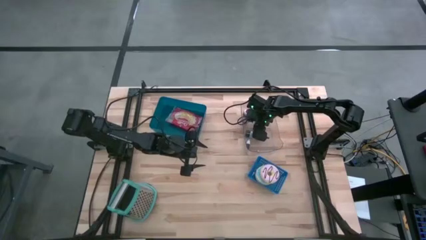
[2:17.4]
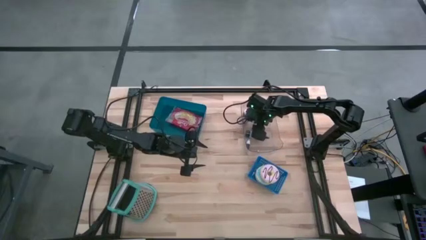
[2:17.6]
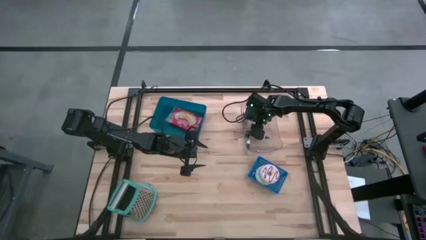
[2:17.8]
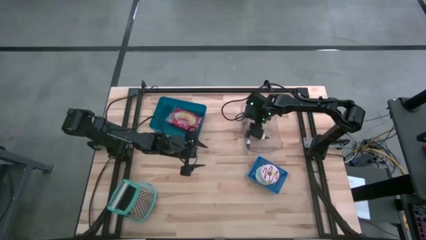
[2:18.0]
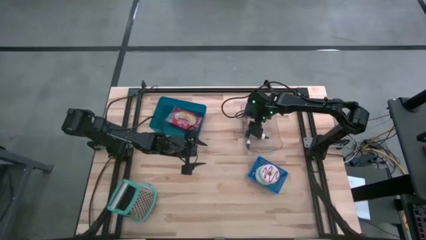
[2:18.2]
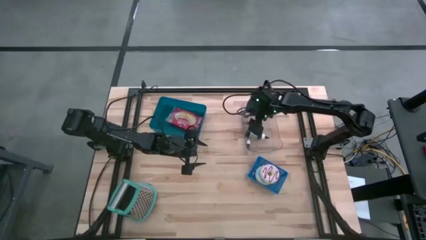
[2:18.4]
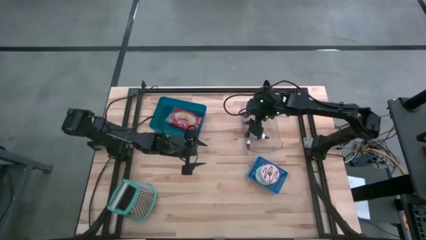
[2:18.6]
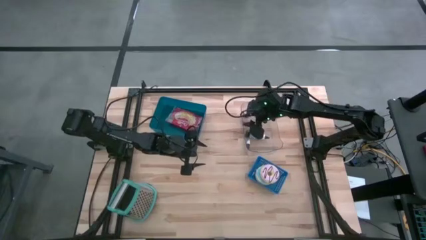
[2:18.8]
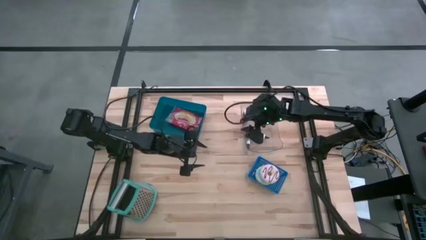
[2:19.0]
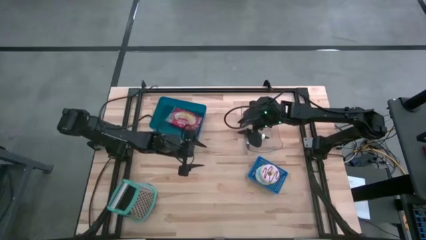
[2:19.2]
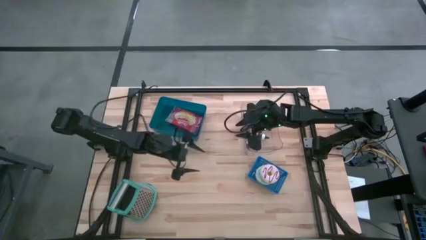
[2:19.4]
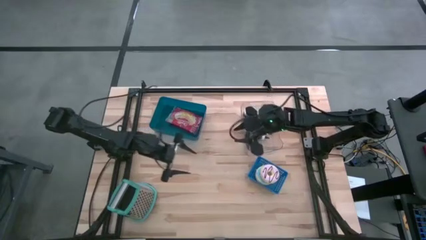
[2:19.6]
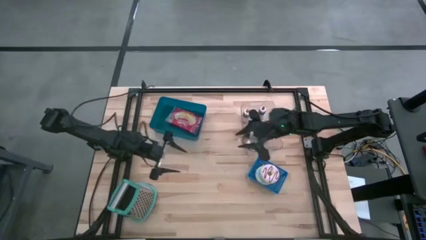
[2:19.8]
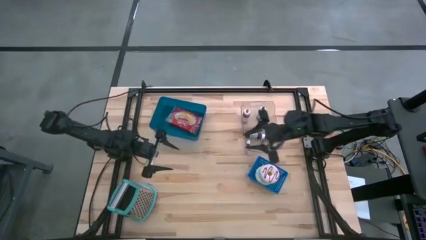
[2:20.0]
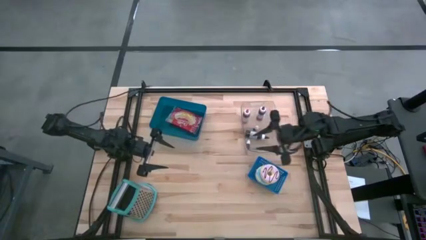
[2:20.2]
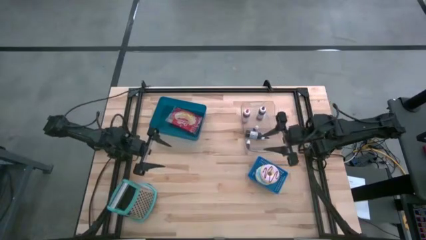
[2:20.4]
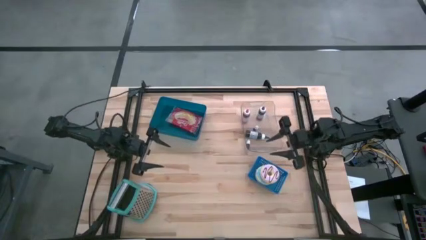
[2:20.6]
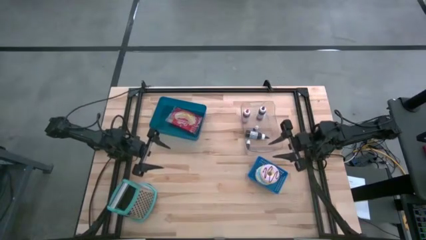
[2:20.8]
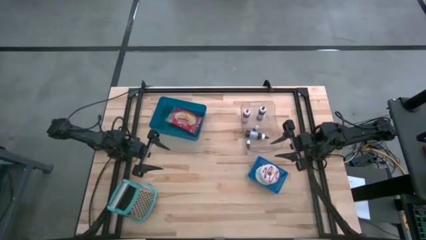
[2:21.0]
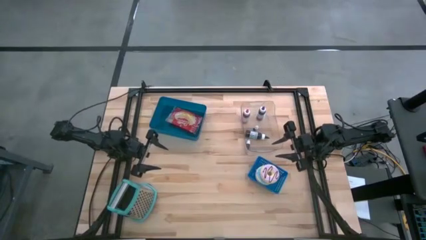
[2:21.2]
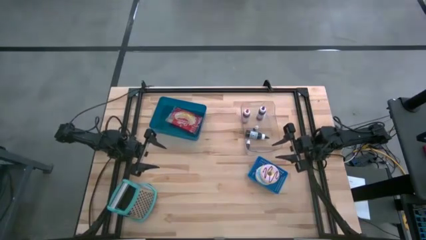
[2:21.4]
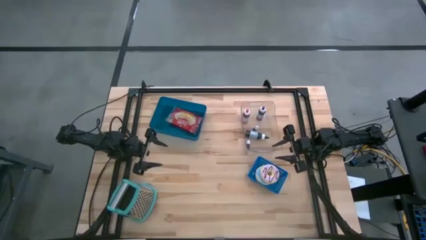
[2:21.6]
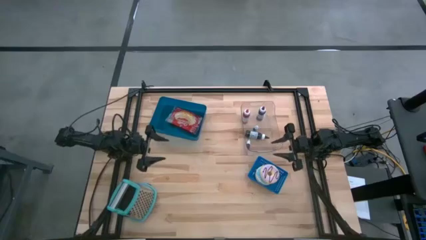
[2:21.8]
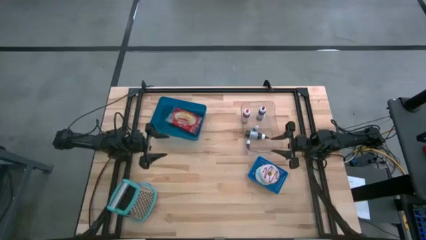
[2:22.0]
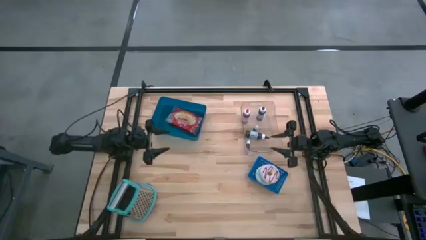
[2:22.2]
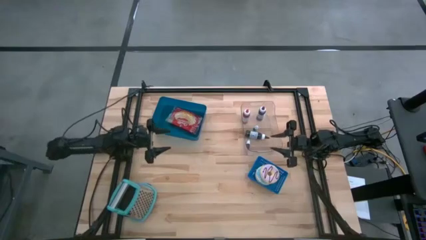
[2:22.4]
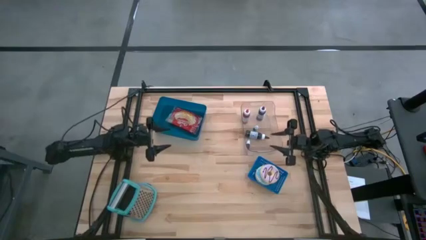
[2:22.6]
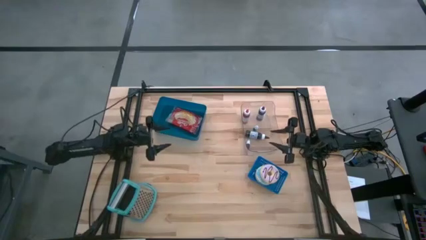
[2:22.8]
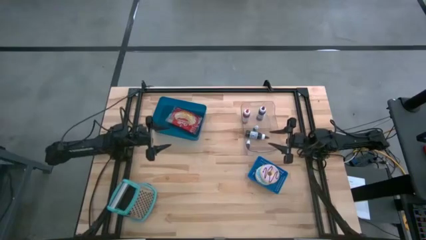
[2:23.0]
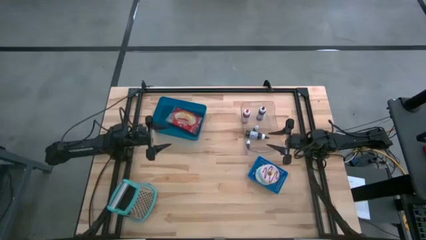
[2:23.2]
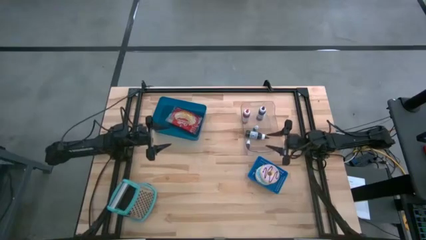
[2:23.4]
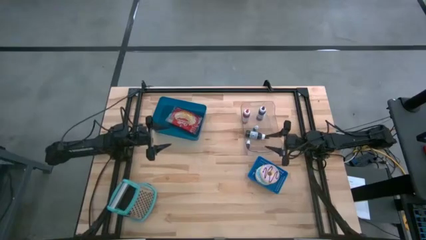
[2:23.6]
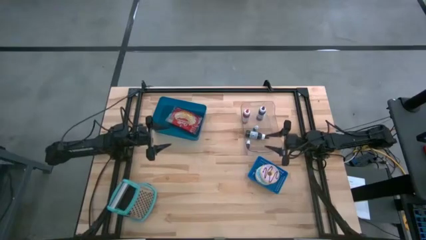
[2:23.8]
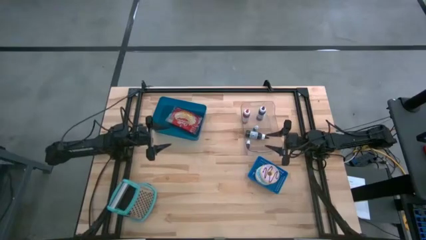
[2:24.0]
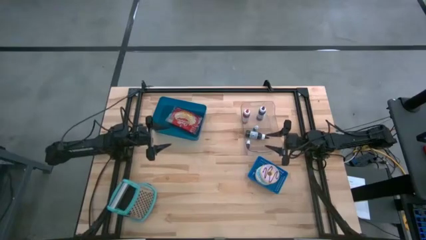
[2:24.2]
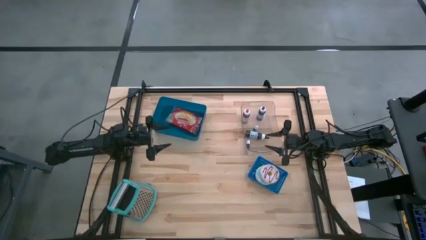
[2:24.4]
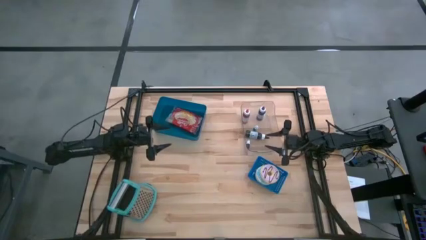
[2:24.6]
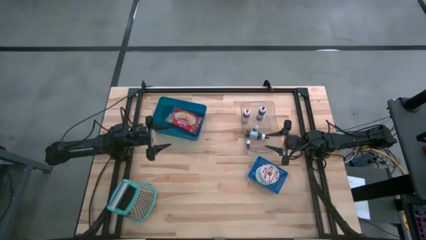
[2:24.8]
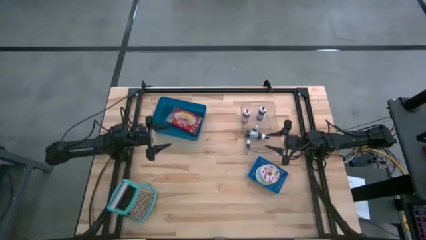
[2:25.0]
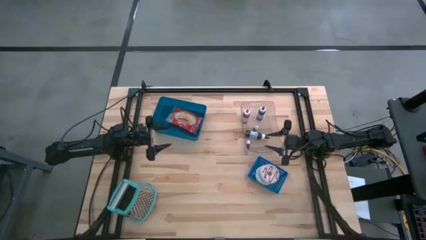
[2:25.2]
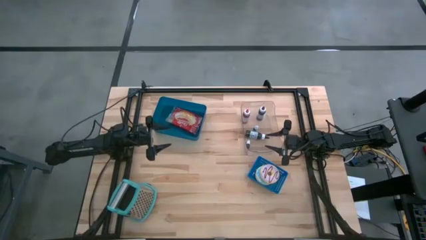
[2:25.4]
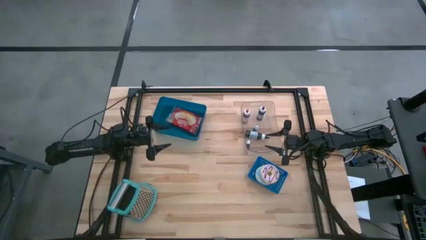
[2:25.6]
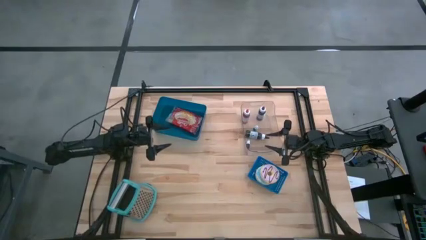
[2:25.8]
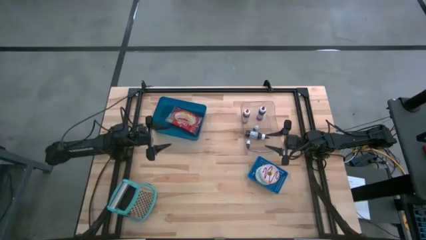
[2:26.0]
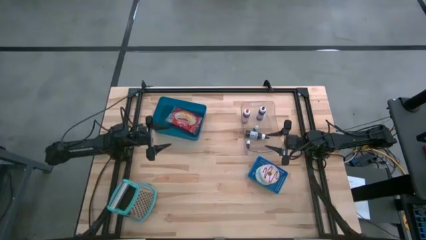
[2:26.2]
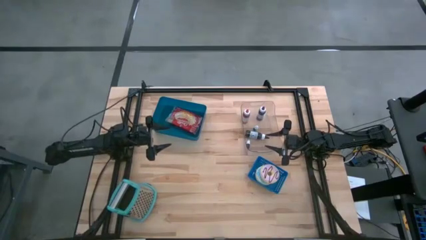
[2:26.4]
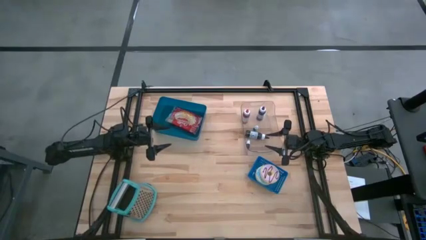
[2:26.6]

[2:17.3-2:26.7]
Task: Pick & Place Food Item
Return to Home Position

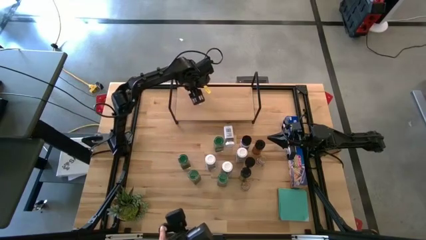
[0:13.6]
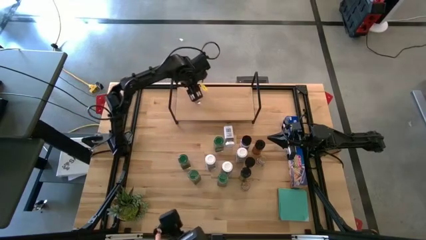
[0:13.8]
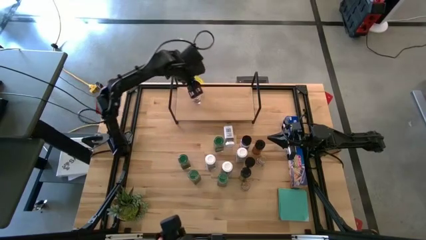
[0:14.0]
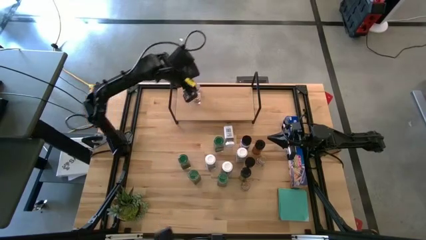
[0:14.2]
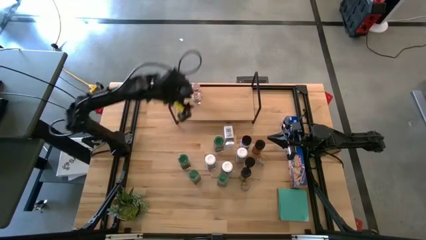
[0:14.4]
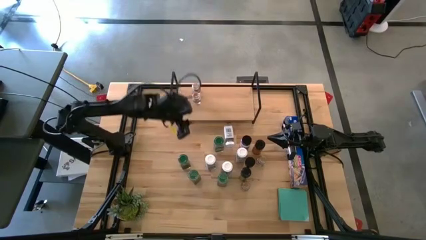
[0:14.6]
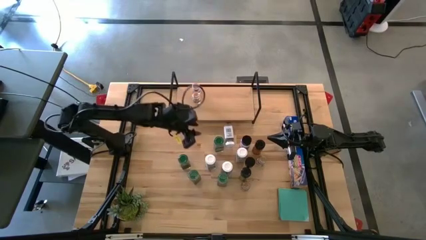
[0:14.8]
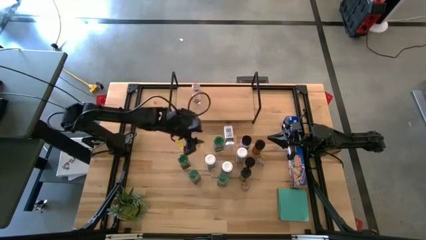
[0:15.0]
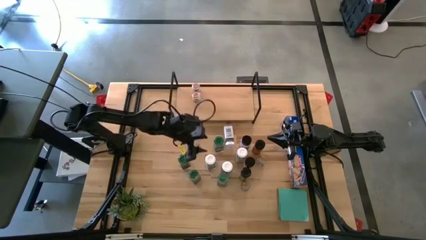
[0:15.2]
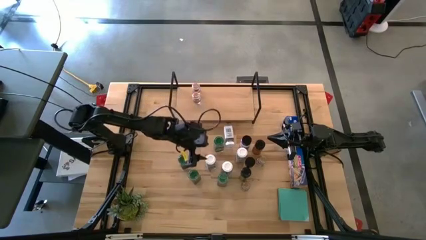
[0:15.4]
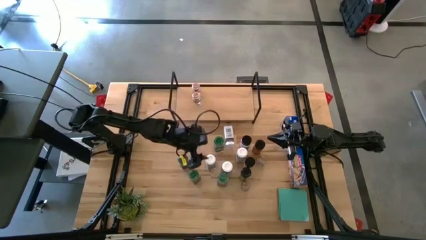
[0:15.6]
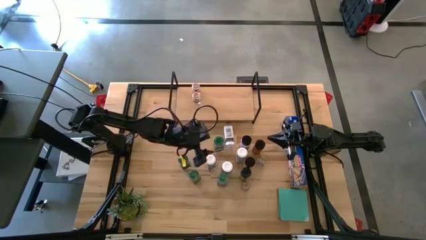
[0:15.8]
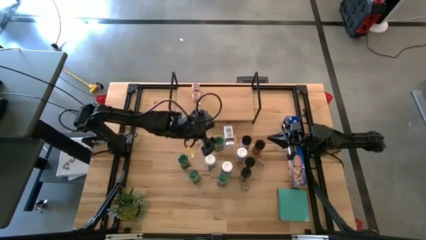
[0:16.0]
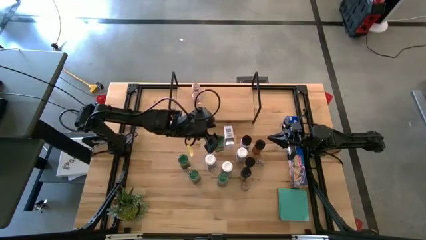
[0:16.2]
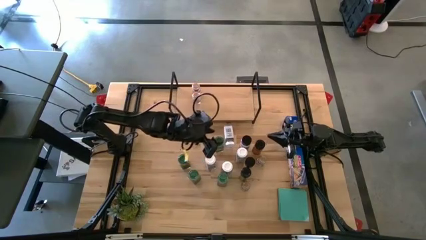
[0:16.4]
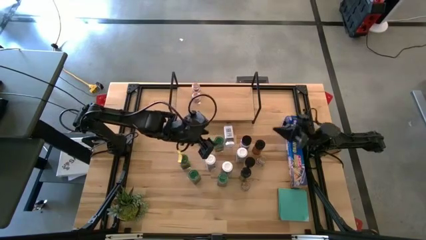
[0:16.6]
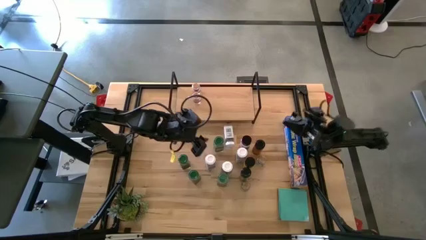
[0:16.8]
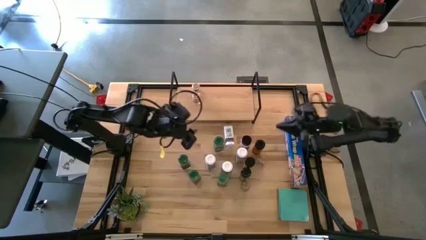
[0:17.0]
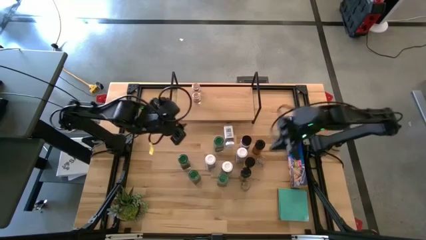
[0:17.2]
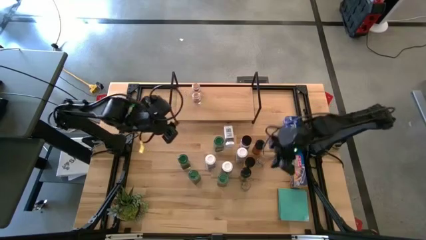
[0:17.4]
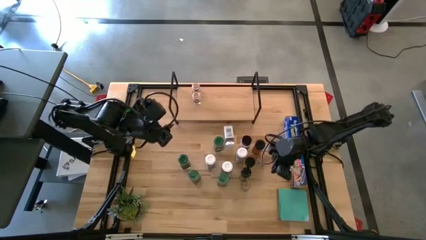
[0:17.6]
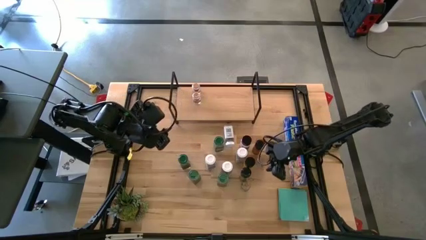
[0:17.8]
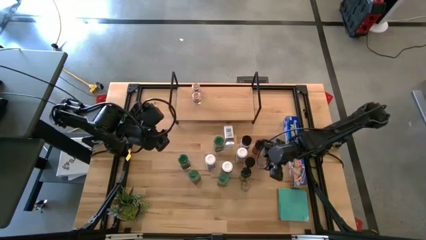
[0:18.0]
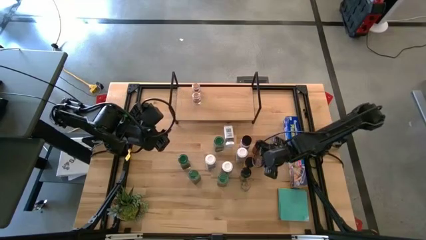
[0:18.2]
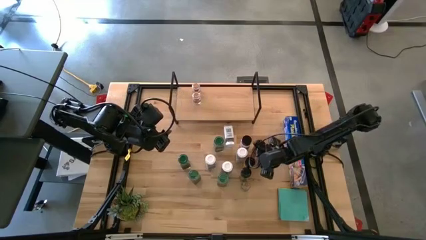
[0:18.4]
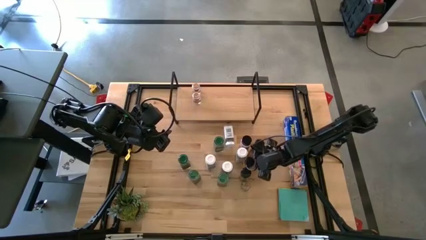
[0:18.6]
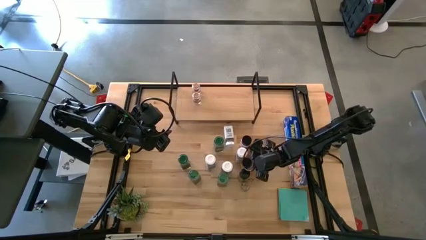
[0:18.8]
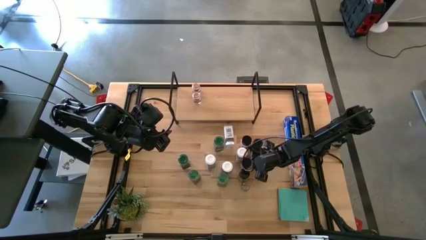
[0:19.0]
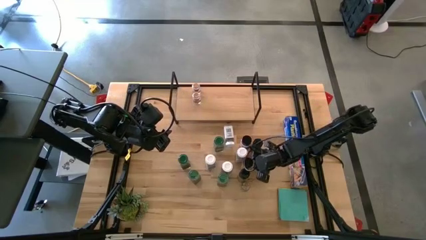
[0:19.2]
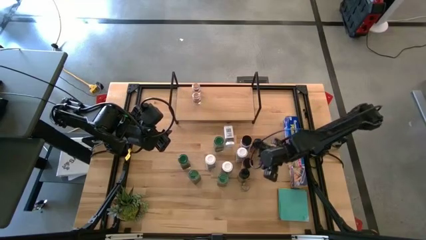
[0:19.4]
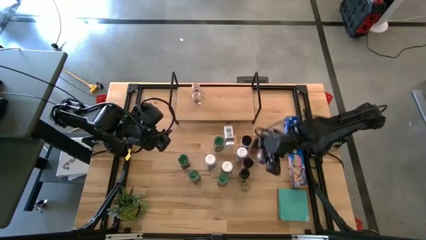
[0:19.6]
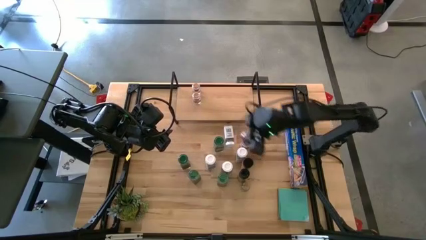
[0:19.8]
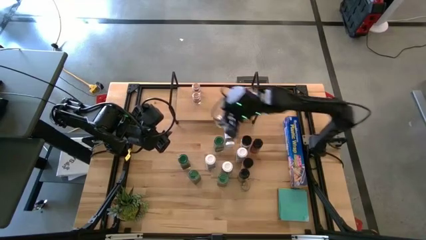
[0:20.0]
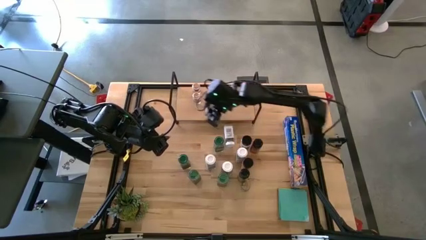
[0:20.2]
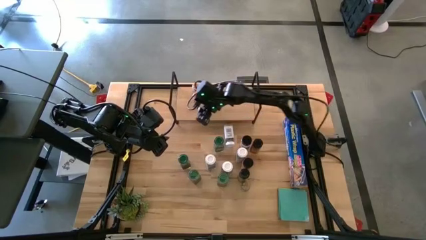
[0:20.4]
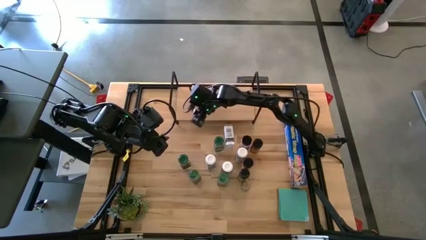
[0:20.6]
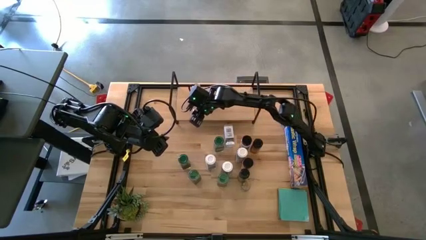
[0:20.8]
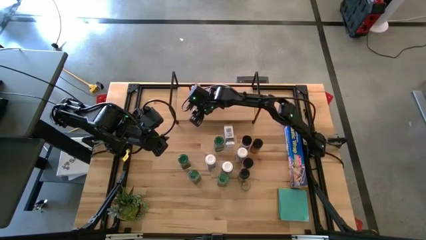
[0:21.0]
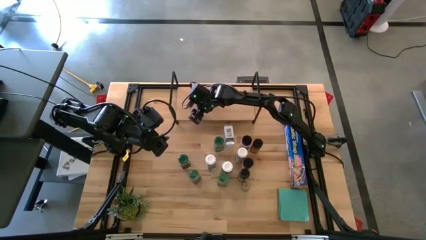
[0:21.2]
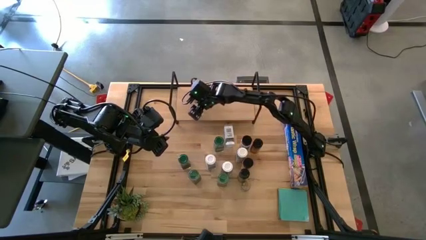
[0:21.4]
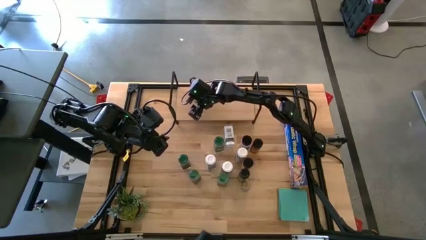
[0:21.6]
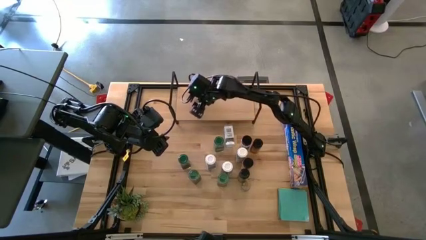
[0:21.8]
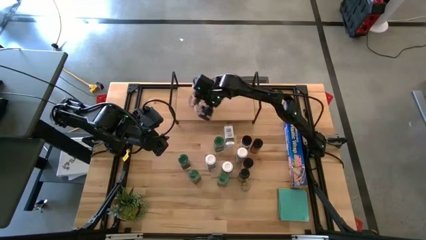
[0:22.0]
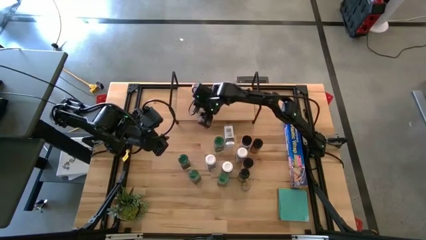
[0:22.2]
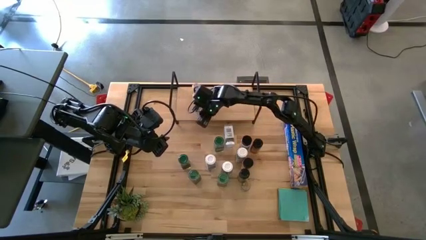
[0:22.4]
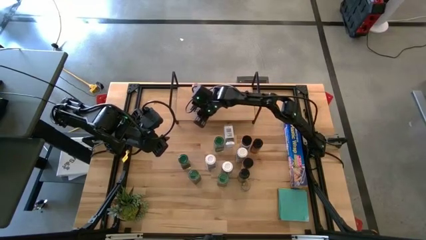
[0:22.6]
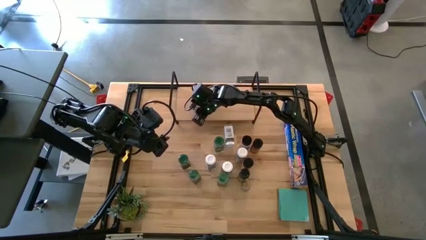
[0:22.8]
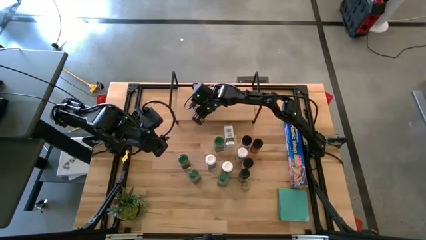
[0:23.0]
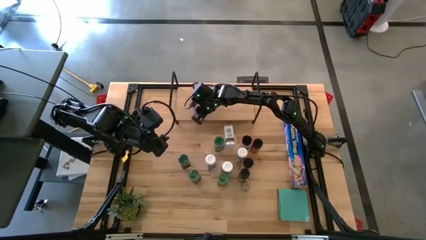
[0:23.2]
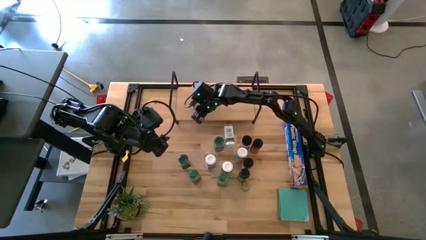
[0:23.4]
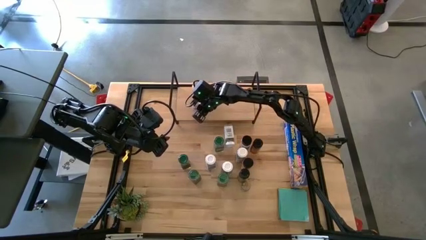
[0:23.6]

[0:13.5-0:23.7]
Task: Shelf spices
Put the top brown seasoning bottle on the shelf aligned with the other brown seasoning bottle
